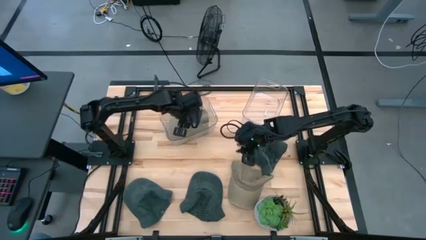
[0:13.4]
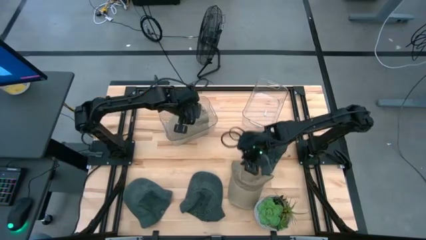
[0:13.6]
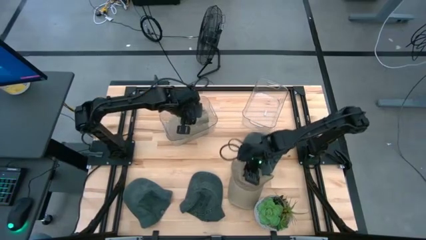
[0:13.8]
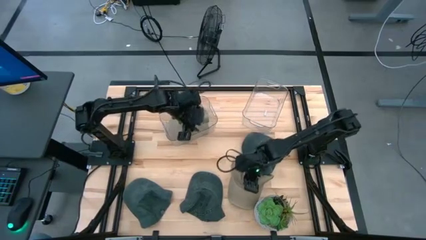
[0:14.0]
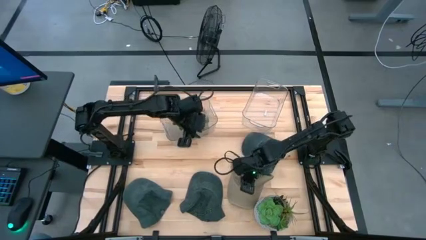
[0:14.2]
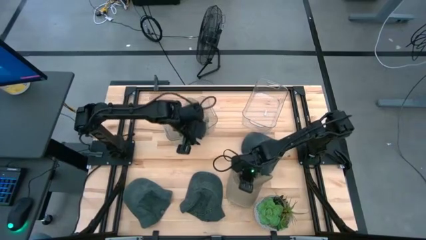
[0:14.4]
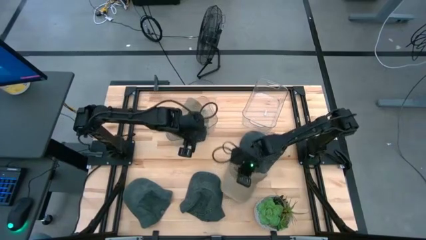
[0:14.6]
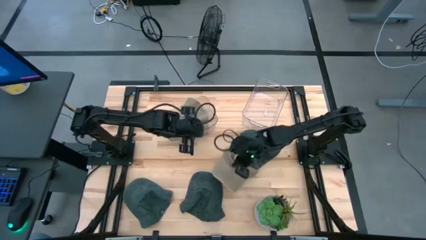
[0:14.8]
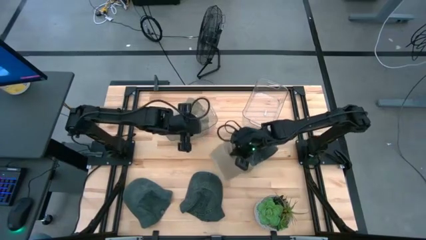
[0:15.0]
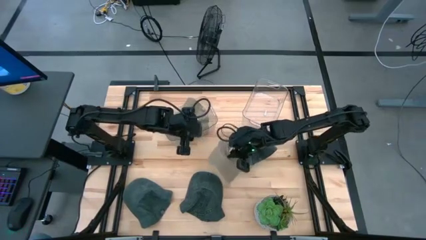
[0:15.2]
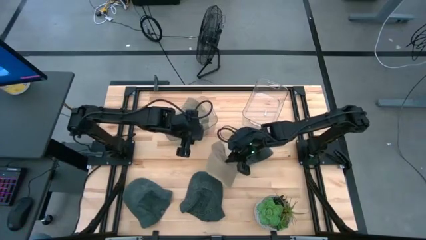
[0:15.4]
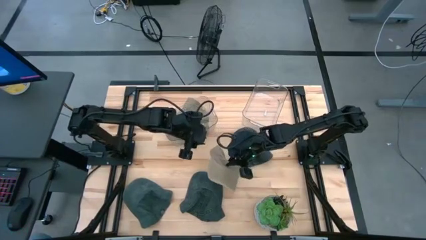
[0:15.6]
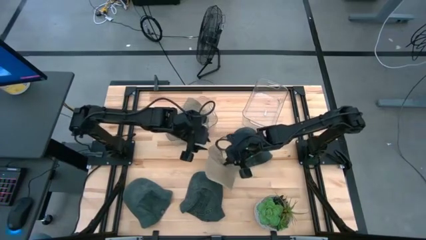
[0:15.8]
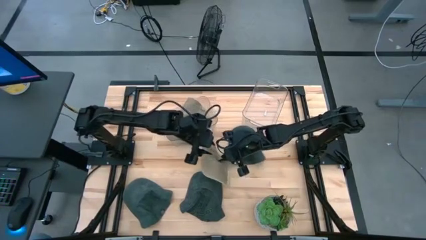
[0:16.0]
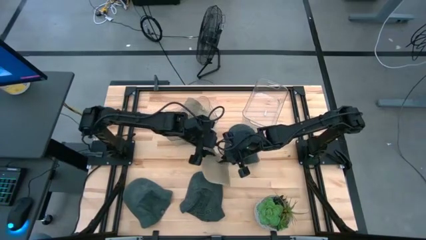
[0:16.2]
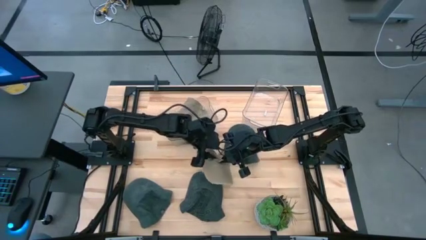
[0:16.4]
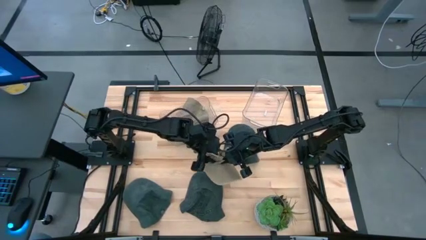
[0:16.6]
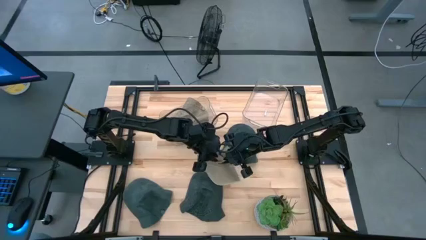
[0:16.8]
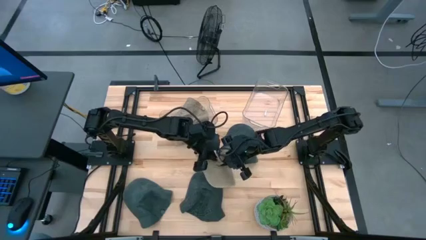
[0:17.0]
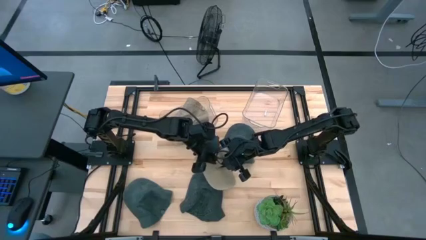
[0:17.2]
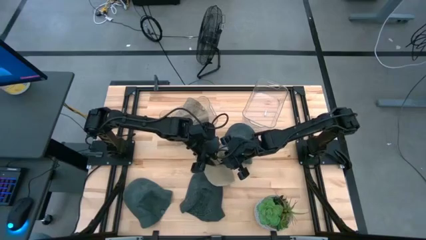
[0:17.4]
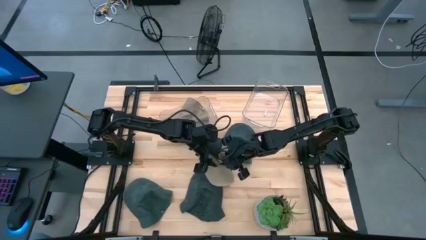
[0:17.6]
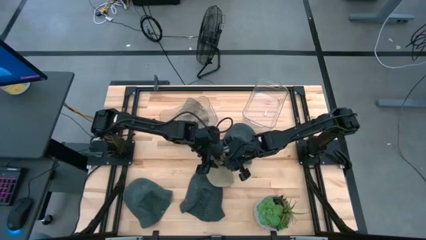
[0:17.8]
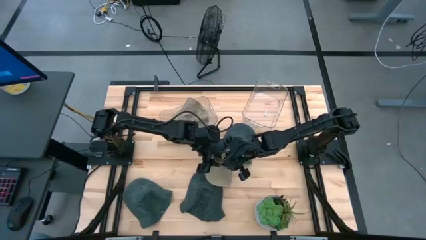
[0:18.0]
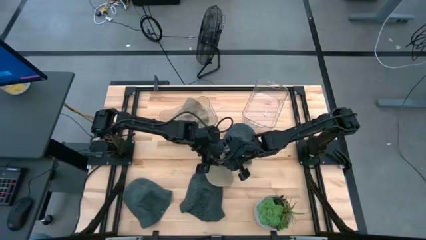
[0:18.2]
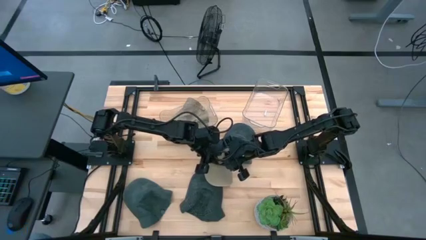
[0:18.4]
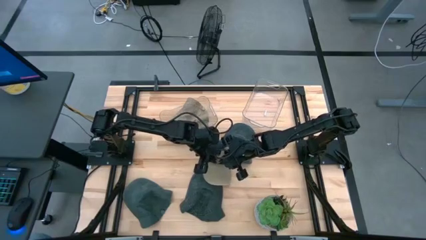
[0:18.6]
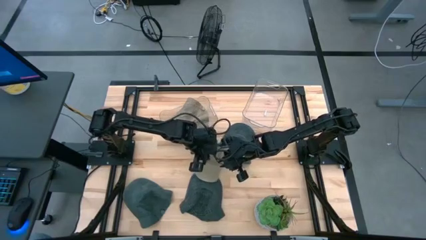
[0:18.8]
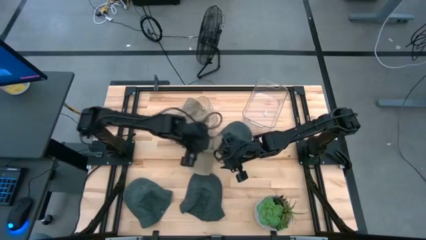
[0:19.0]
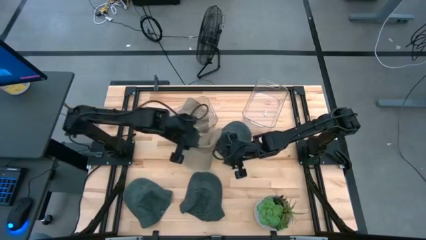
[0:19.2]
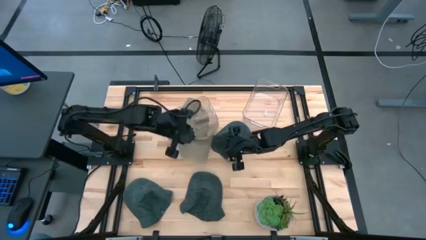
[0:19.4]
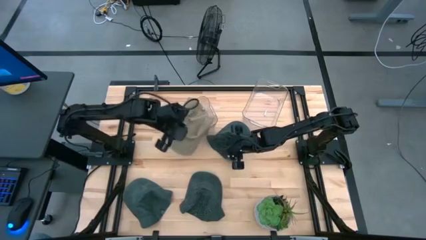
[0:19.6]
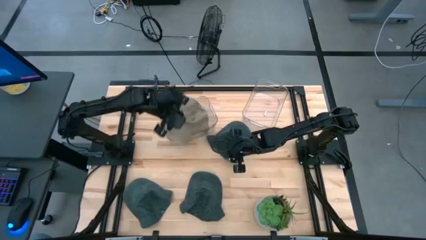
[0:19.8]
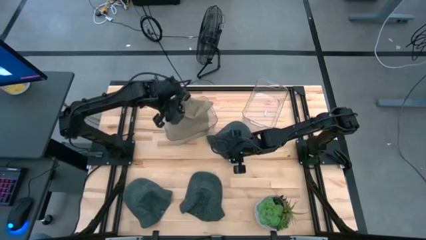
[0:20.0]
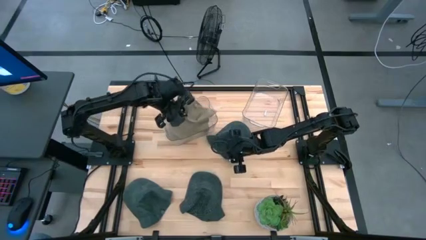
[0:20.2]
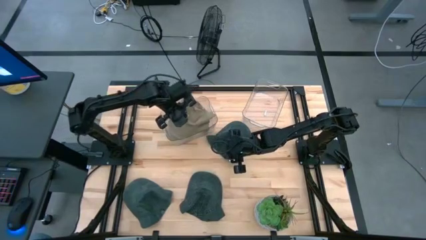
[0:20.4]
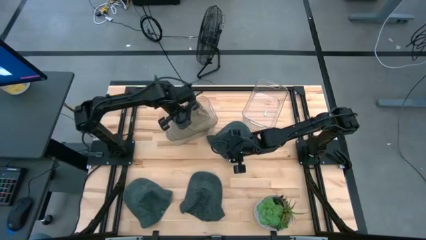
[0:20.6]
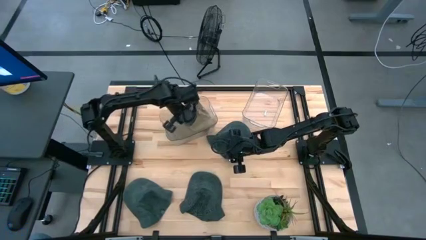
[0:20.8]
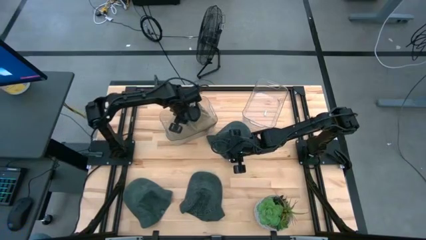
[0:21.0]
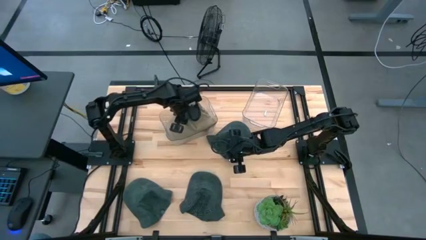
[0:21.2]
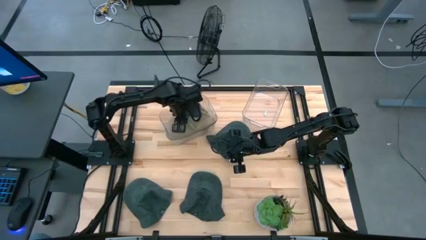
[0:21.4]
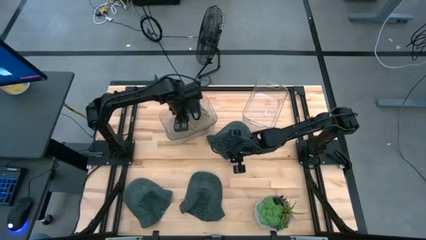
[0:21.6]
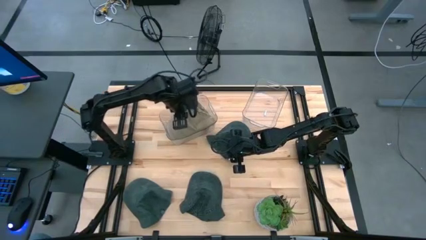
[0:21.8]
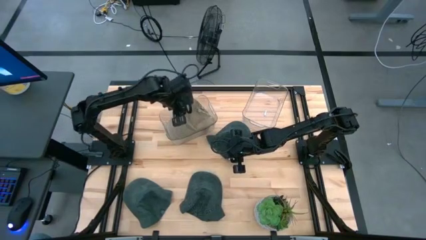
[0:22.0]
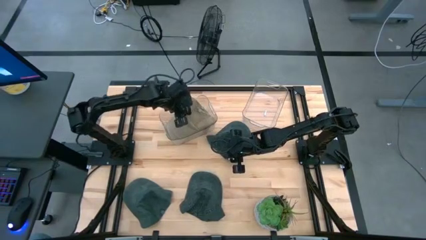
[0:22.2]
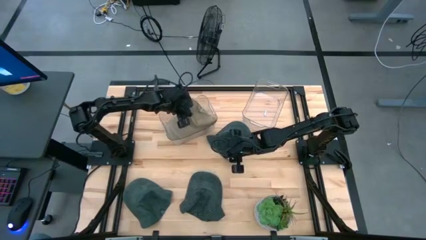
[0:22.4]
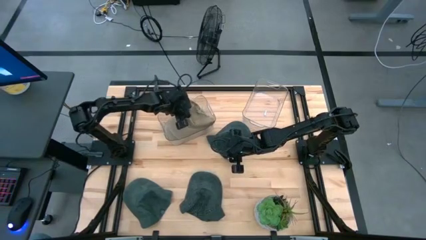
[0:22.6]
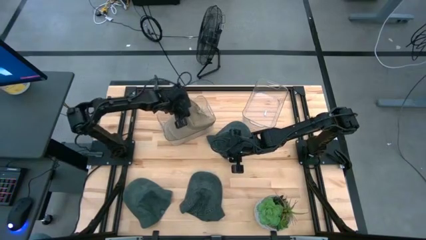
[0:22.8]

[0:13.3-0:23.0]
Task: Pick & Place hat
Put the brown cap into the left transparent bin

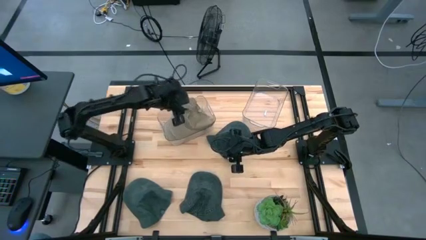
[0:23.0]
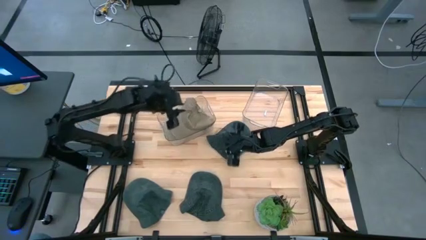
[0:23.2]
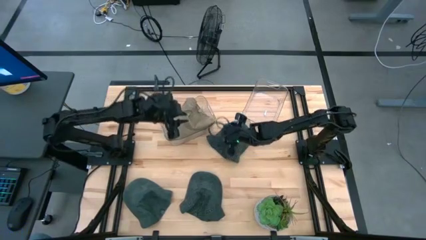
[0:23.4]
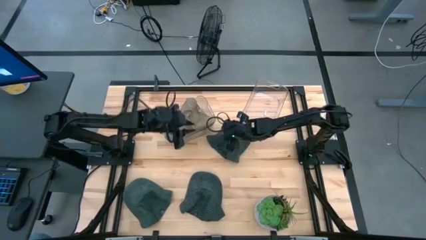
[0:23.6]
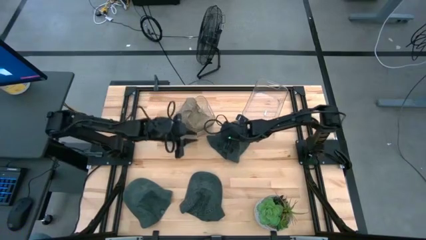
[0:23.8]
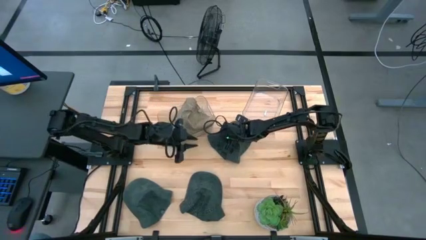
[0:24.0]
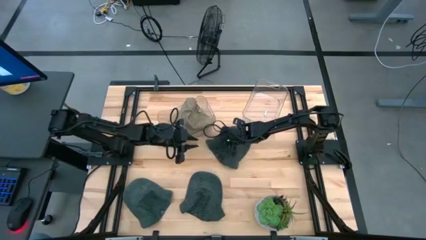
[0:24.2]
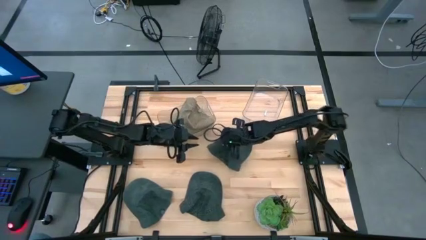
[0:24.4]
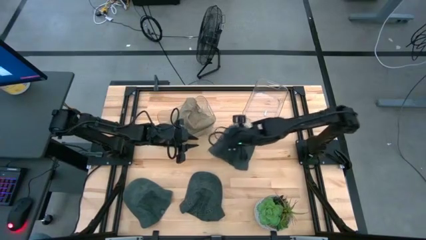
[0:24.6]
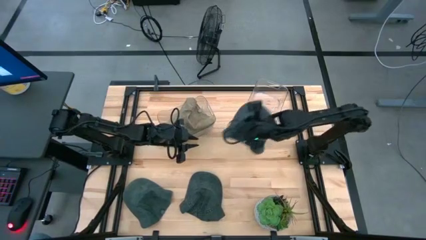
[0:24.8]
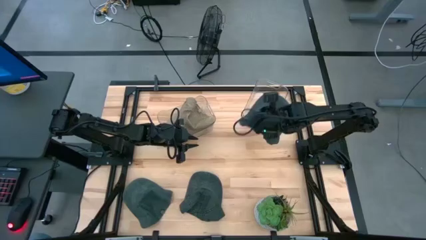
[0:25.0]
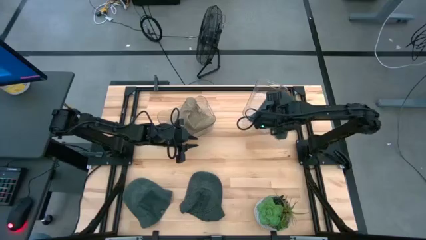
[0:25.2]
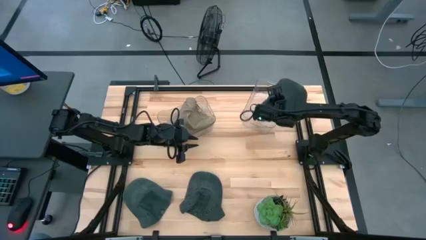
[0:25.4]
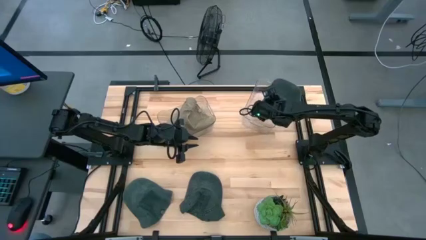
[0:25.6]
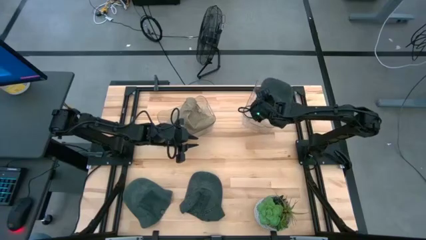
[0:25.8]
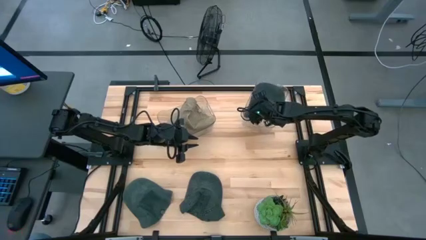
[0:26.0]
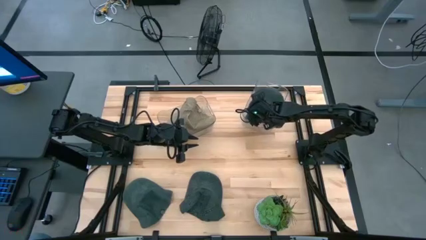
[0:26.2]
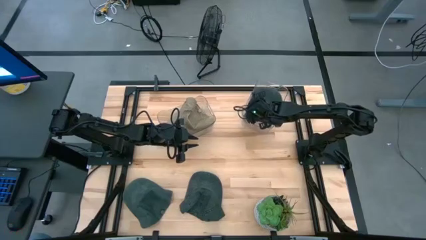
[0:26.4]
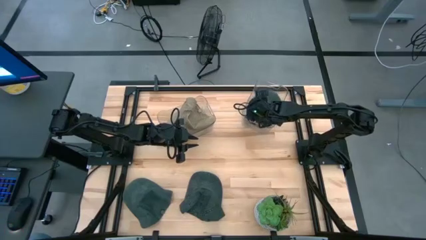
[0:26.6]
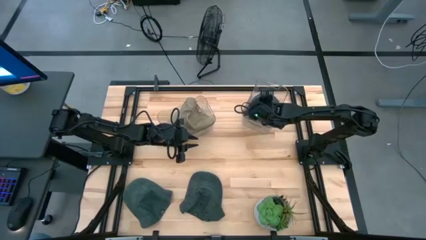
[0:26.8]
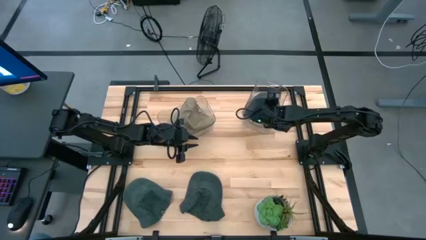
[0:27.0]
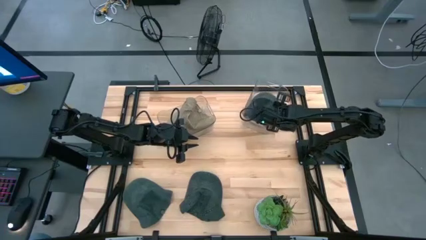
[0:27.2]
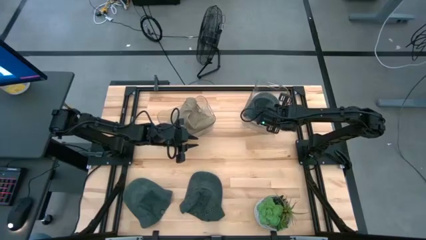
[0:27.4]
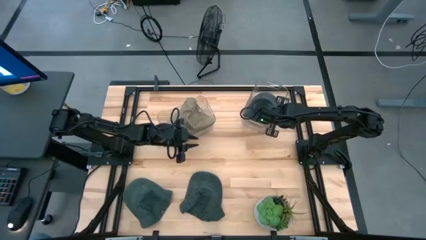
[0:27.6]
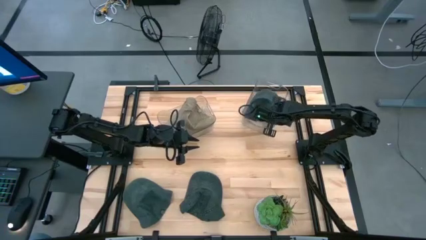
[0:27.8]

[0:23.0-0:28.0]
Put the top gray cap into the right transparent bin

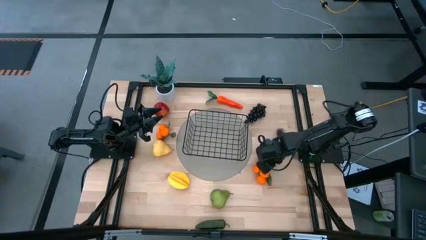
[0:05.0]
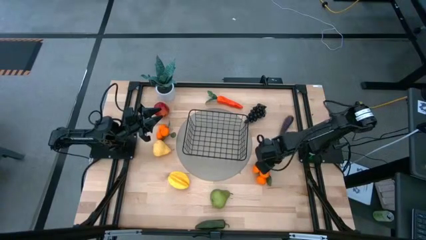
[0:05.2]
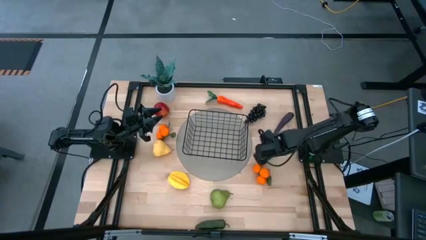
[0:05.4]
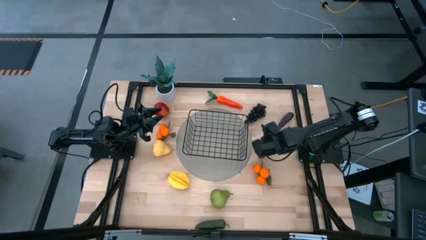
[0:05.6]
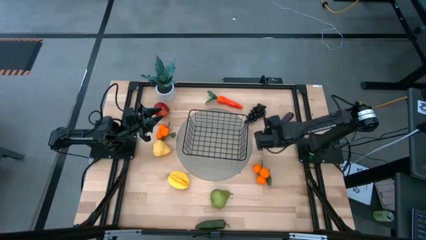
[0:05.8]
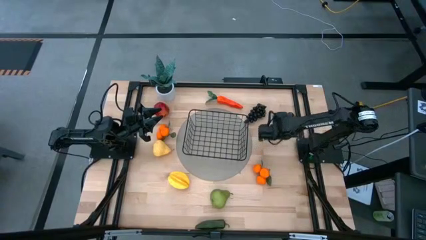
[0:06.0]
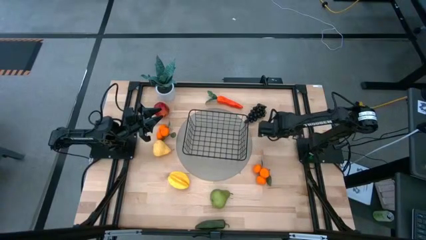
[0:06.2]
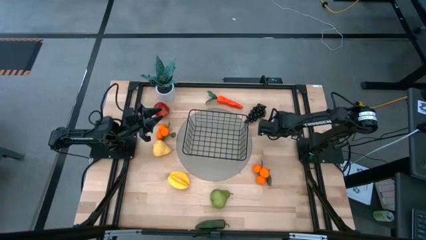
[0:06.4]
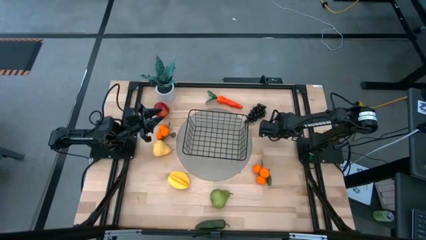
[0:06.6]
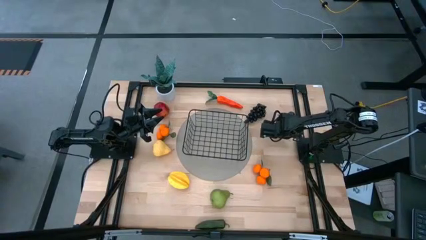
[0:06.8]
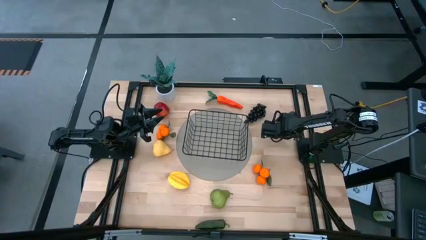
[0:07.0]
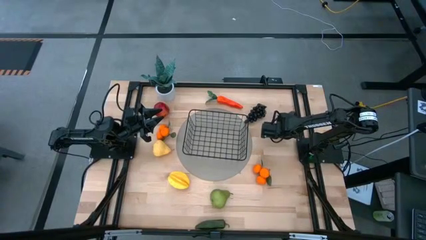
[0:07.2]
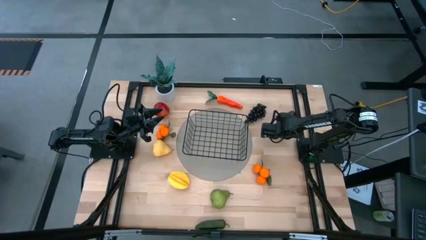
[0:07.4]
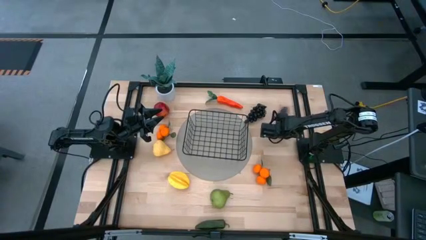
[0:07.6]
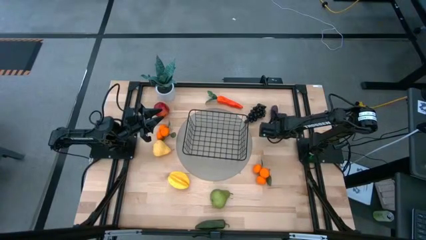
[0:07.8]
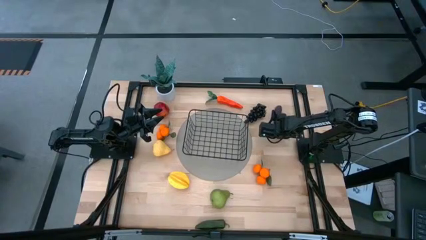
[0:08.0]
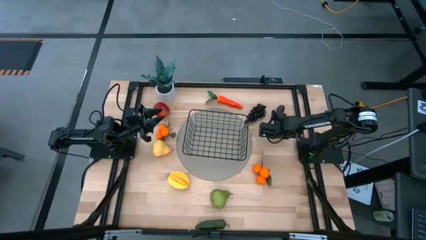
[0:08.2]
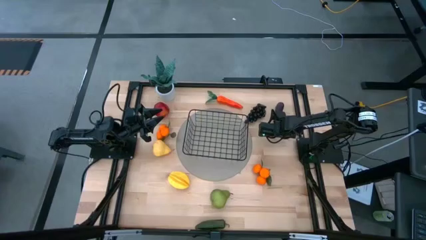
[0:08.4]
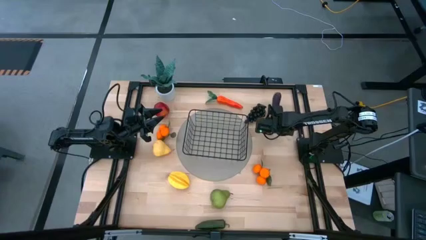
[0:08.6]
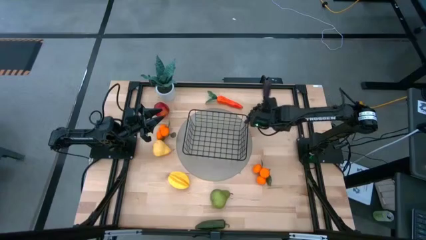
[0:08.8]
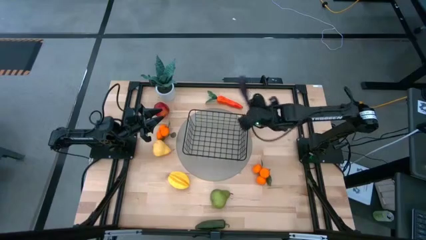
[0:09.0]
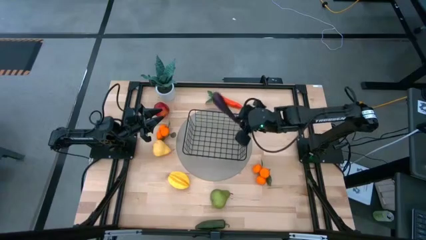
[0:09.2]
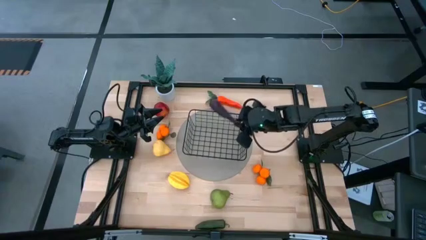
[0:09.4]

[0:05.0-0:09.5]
Task: Build produce basket
Put the purple eggplant into the black wire basket
